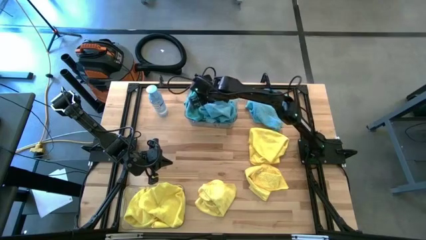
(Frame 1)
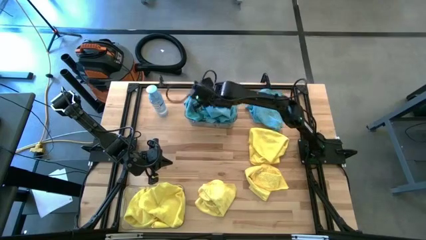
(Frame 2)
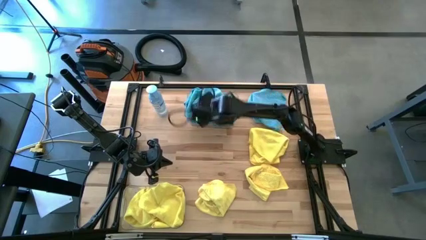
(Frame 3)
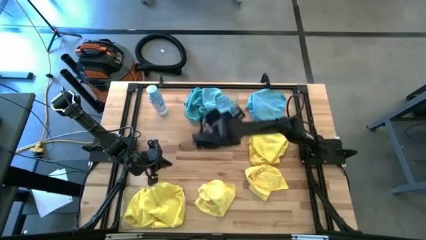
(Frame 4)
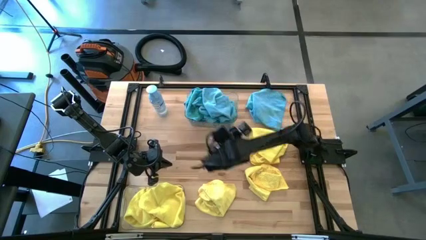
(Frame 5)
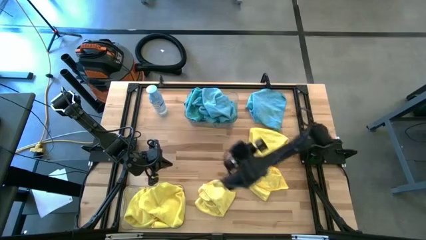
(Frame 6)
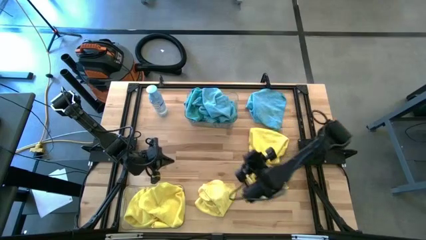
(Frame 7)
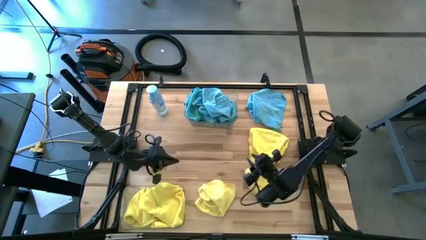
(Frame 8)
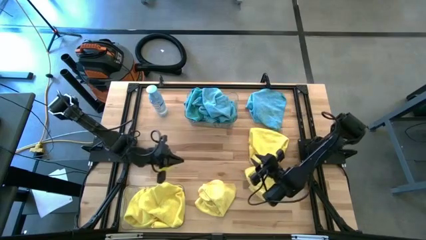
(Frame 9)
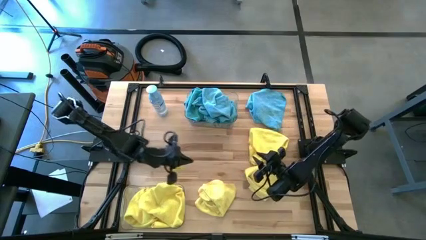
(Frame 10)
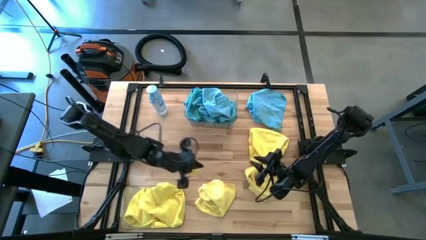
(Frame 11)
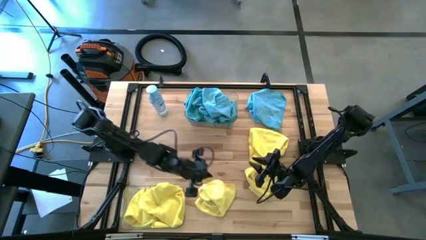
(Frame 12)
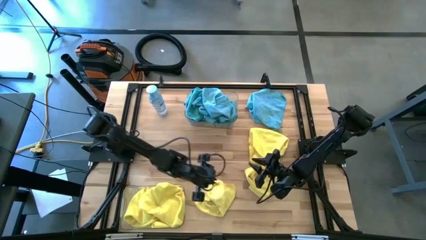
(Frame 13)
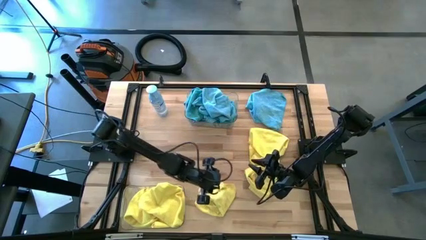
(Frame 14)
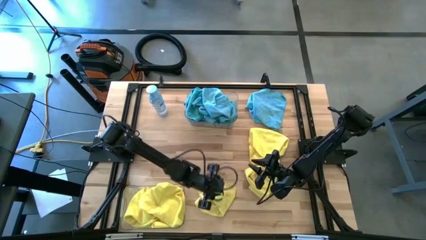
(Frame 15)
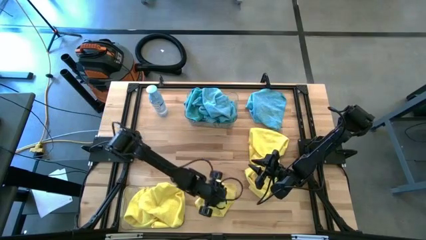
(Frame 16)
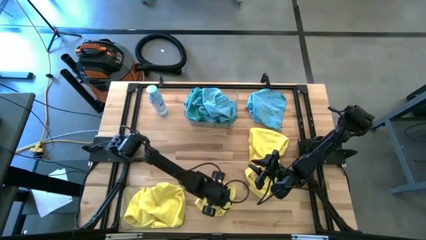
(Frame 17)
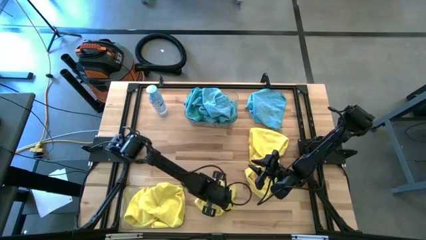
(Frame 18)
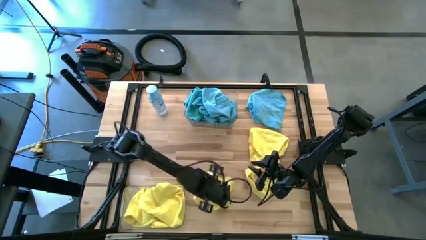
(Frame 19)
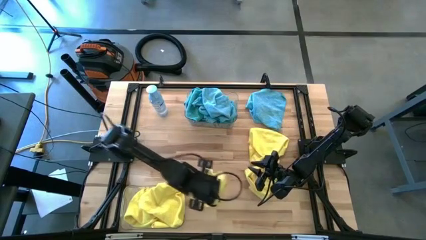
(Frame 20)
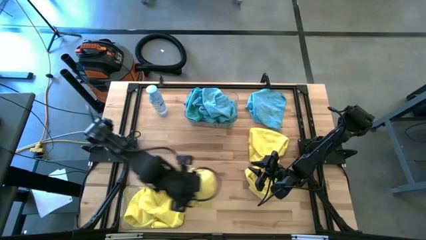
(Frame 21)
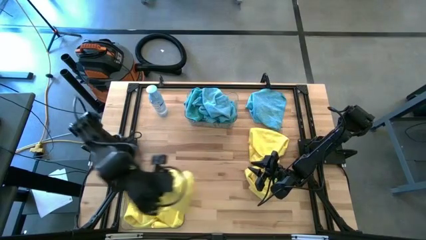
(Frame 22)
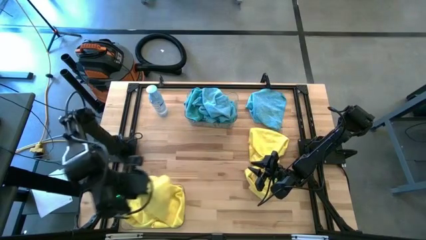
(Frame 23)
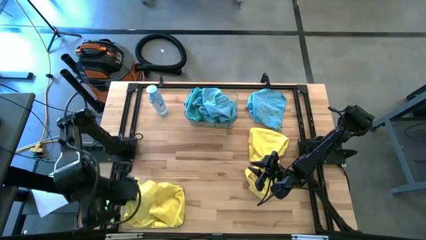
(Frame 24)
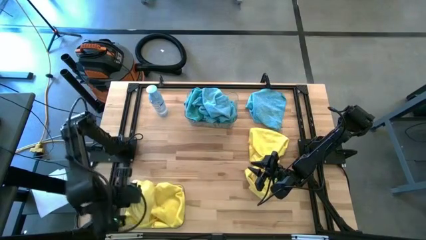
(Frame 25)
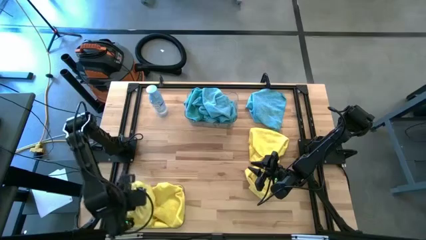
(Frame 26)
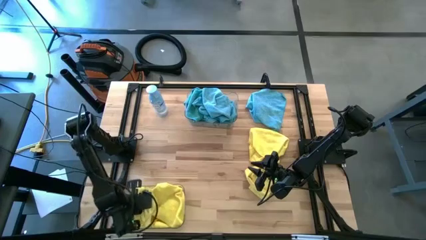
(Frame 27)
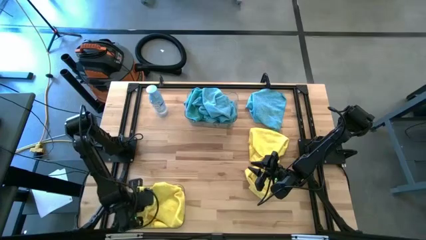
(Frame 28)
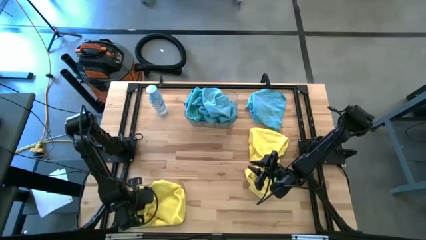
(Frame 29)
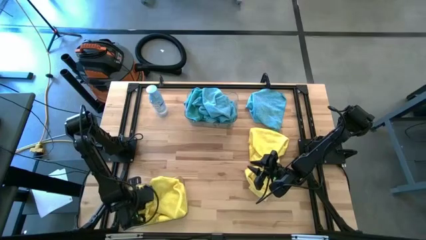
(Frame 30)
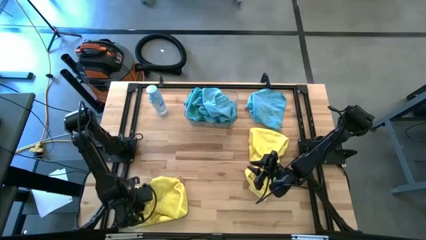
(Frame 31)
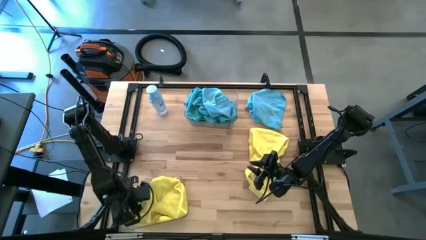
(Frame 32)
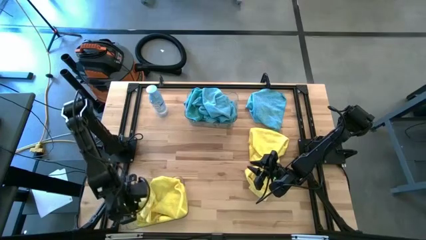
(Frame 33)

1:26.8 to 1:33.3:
Task: Sort microfiber towel by color & place in baskets
Put the yellow microfiber towel into the bottom transparent bin

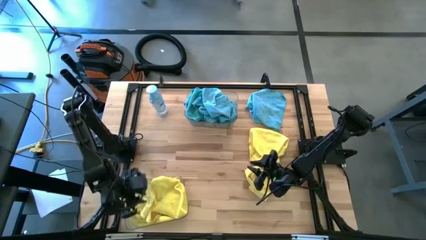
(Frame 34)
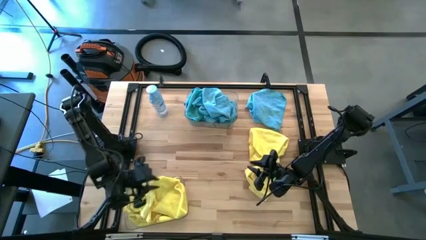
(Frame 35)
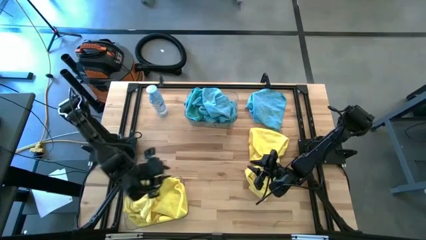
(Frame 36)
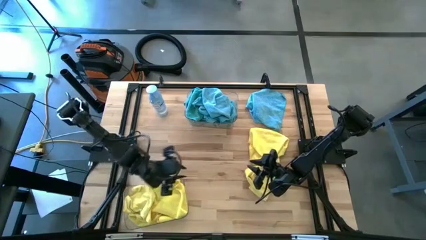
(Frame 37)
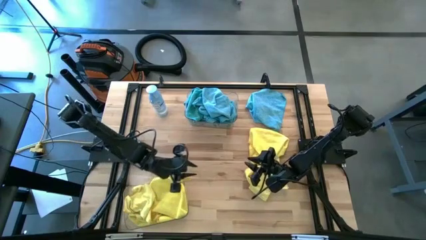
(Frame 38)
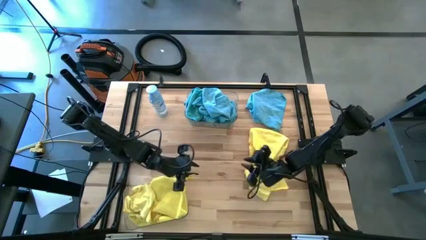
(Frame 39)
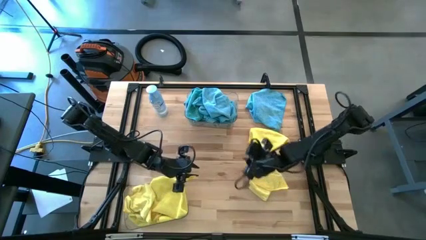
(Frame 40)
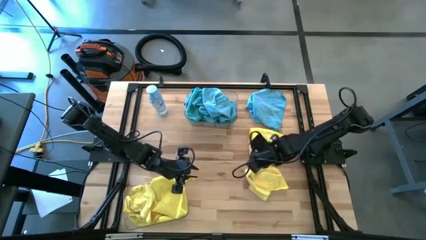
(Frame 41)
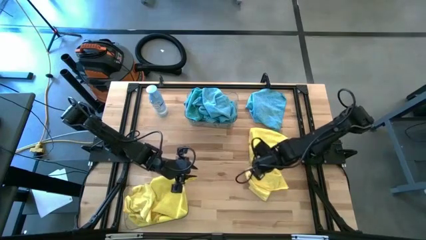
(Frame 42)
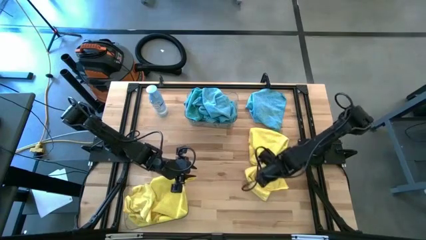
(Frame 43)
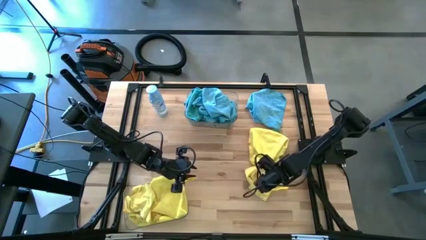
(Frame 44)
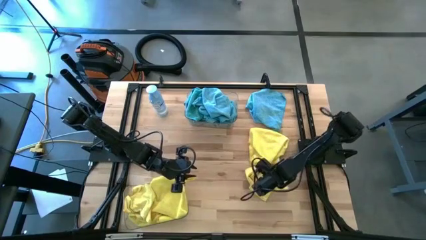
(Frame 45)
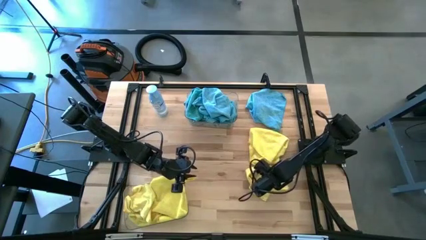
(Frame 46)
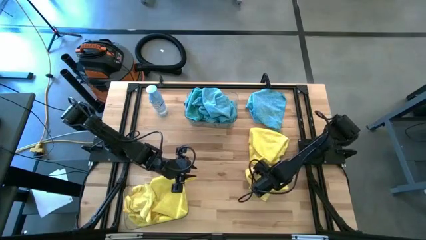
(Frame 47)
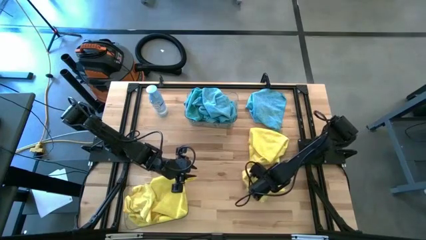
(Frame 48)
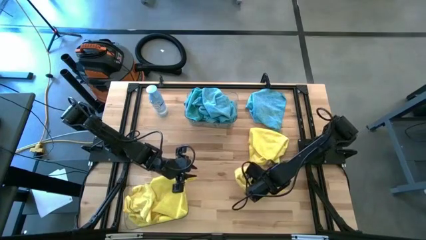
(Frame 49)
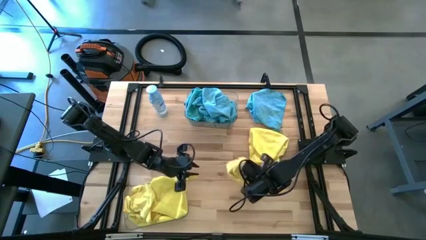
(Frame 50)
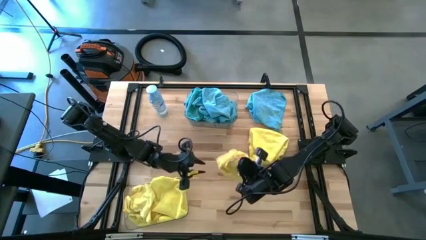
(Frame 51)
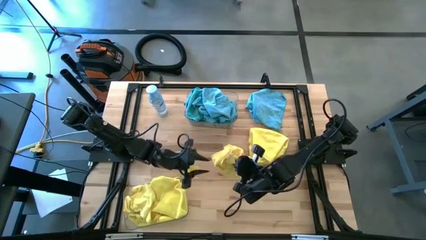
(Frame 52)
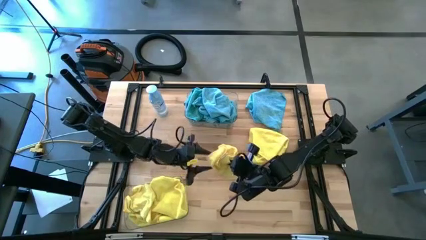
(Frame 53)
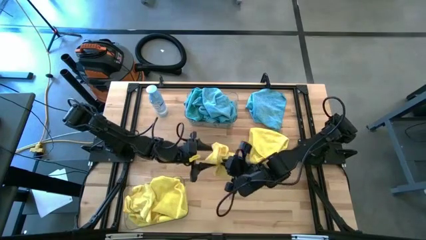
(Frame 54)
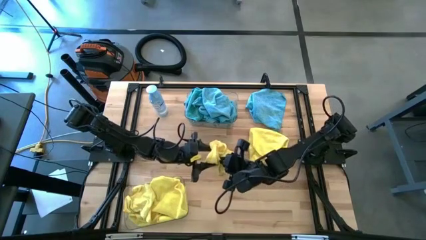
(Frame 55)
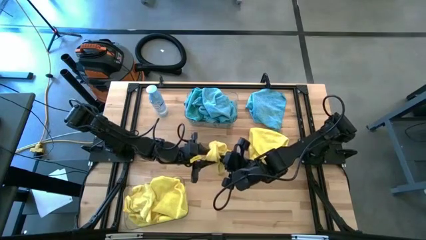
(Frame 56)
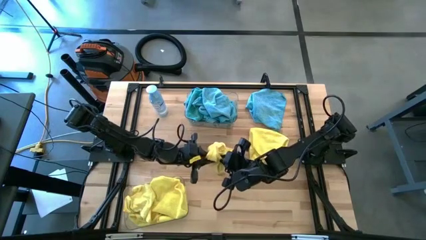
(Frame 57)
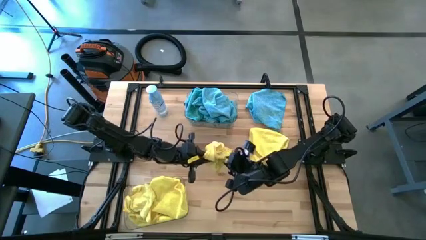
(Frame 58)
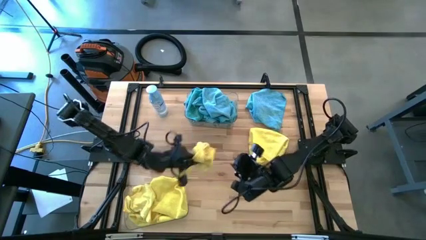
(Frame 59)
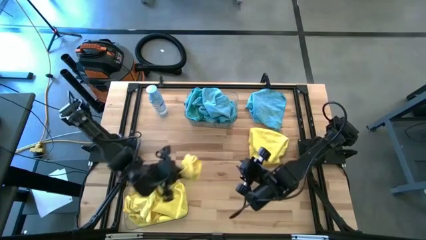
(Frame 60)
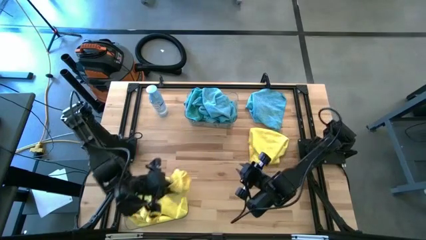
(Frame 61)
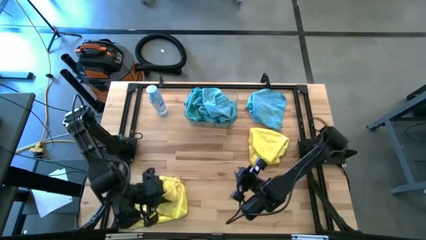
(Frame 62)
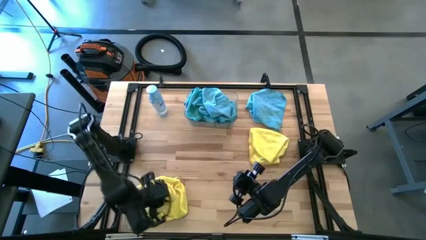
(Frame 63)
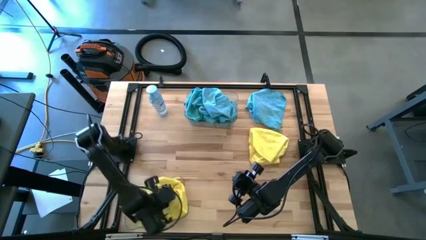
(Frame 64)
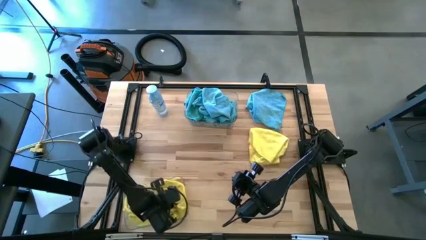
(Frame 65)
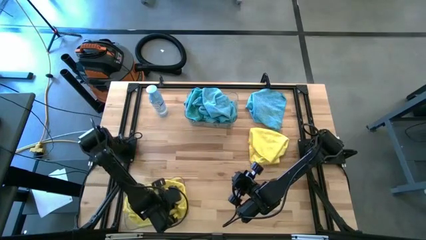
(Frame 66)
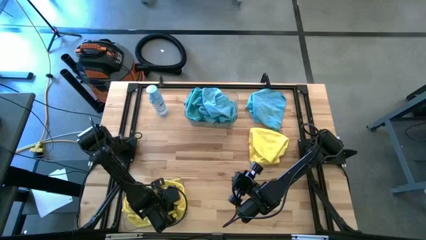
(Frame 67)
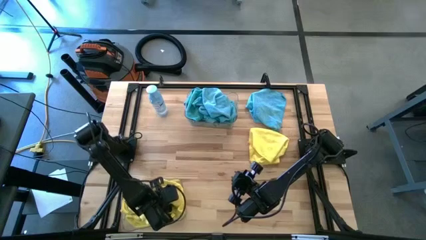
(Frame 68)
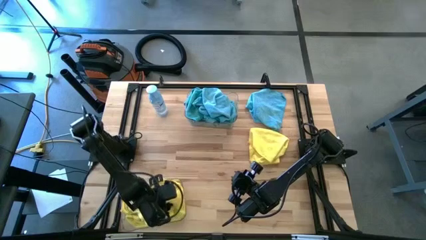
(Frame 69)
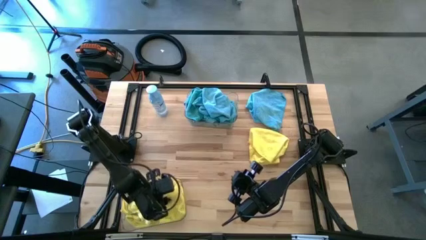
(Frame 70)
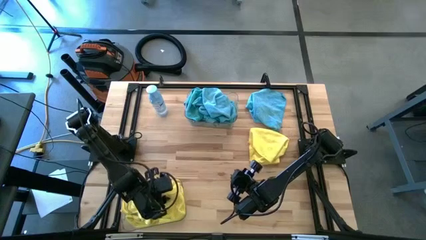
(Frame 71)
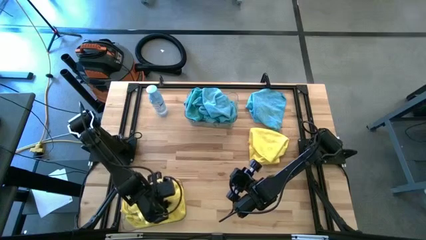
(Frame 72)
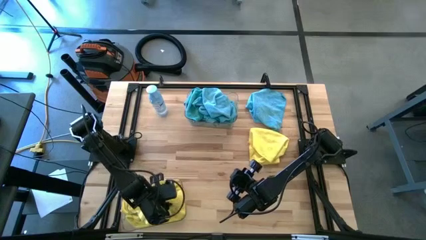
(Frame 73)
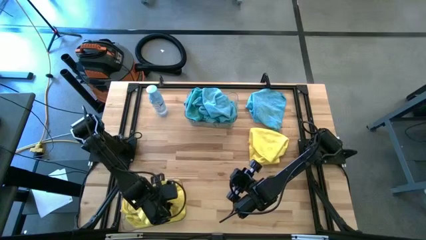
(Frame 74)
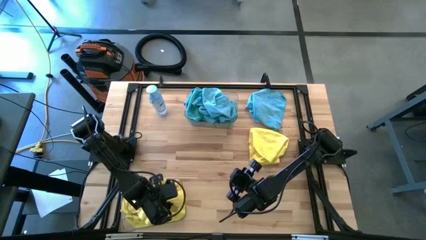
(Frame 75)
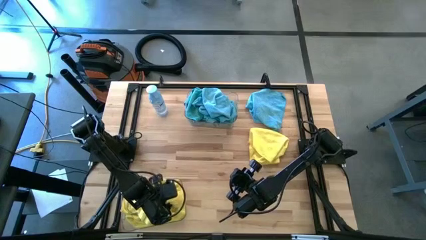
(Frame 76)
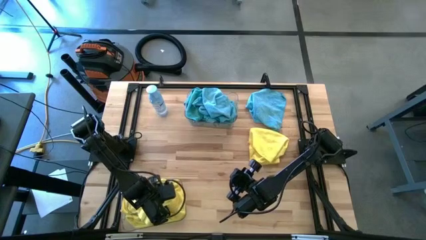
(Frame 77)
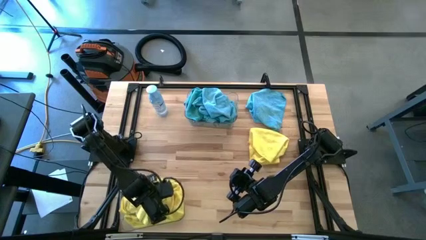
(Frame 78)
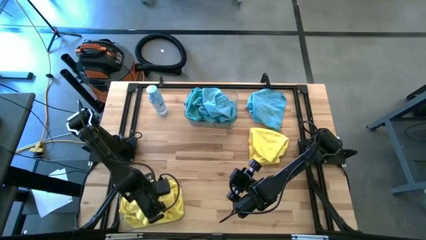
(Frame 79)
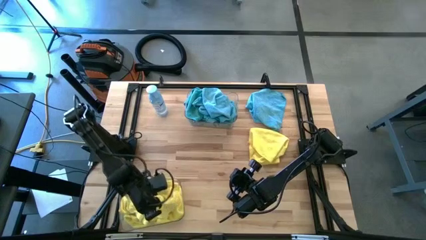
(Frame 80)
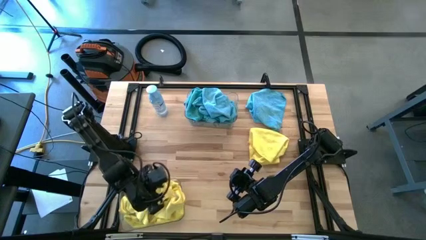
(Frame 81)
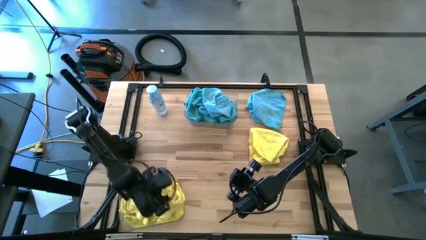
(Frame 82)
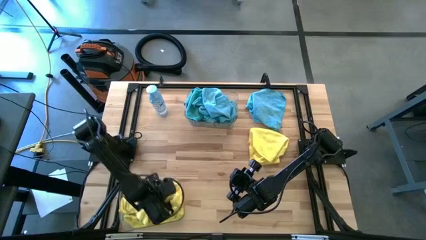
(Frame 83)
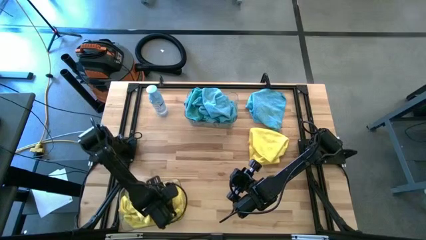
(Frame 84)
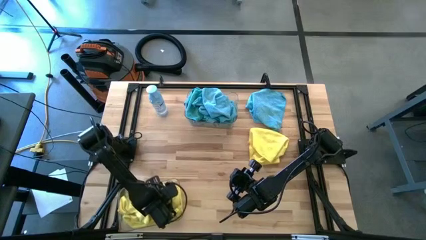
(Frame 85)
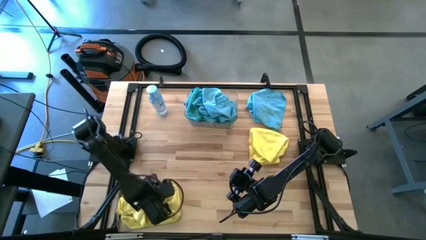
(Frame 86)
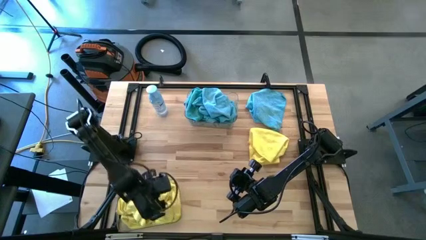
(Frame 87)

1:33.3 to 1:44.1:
Put the yellow microfiber towel into the bottom transparent bin
